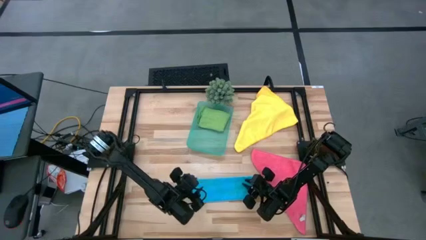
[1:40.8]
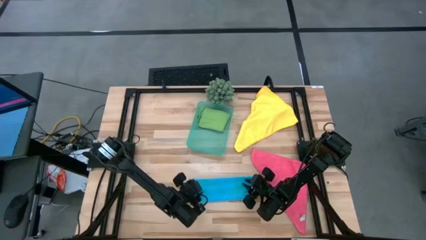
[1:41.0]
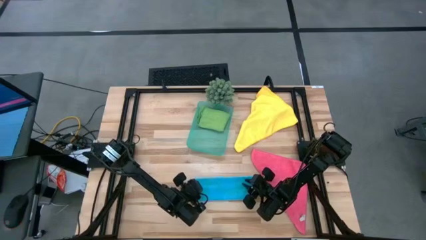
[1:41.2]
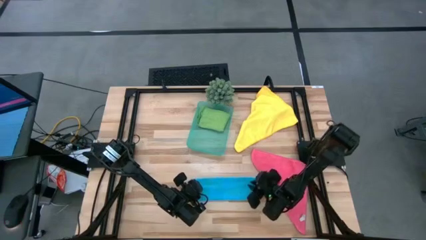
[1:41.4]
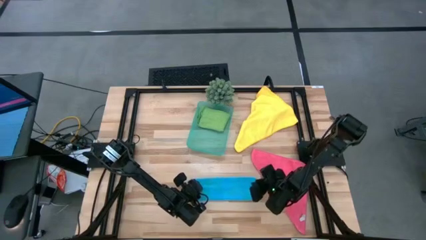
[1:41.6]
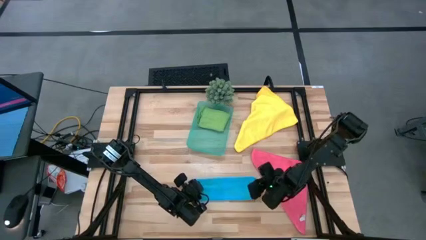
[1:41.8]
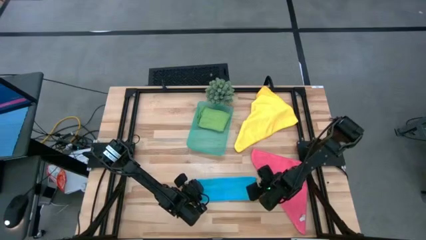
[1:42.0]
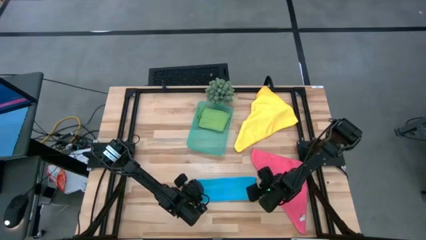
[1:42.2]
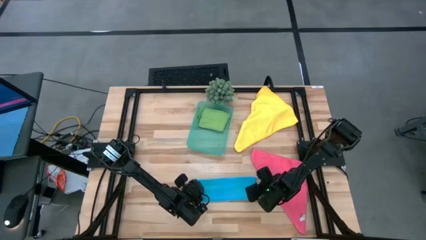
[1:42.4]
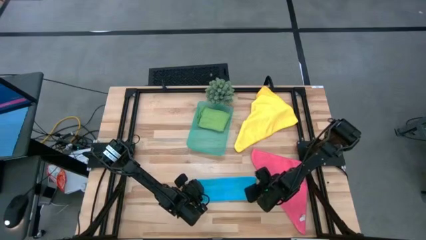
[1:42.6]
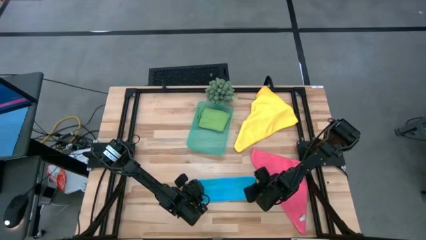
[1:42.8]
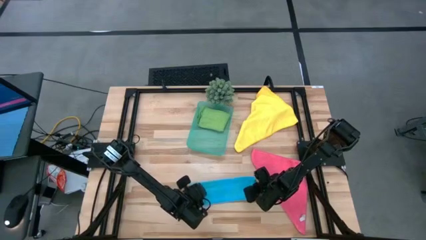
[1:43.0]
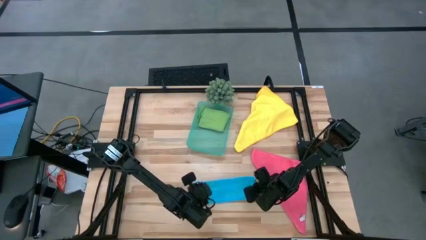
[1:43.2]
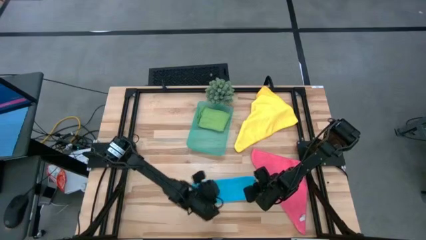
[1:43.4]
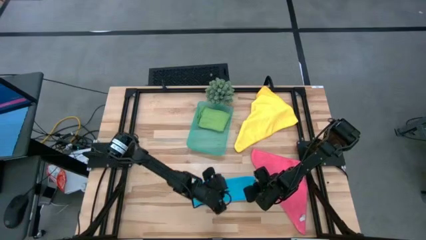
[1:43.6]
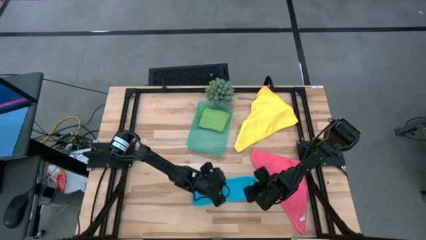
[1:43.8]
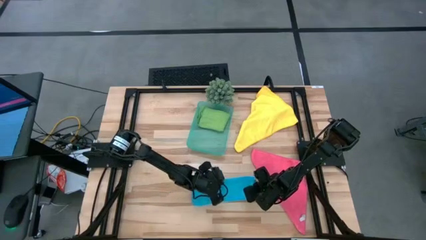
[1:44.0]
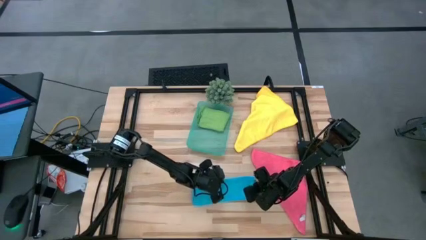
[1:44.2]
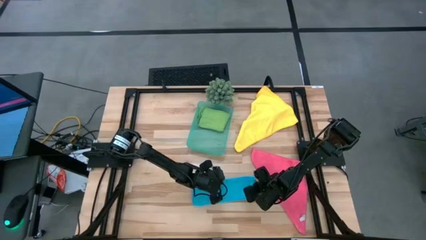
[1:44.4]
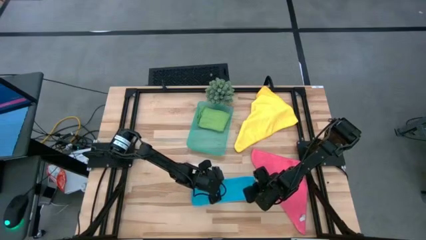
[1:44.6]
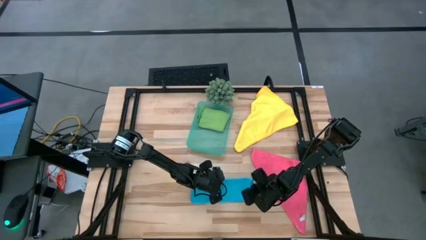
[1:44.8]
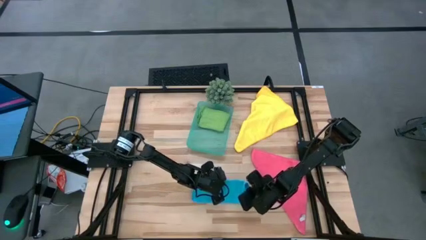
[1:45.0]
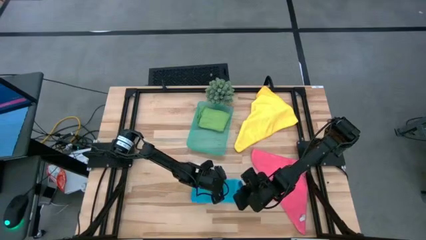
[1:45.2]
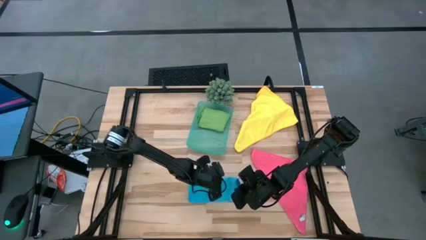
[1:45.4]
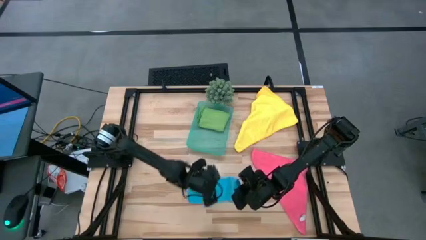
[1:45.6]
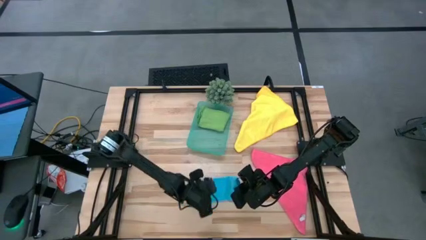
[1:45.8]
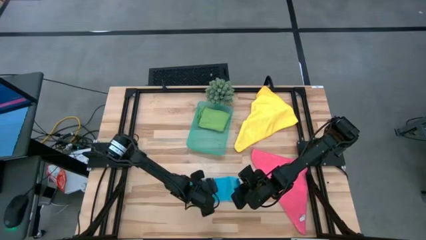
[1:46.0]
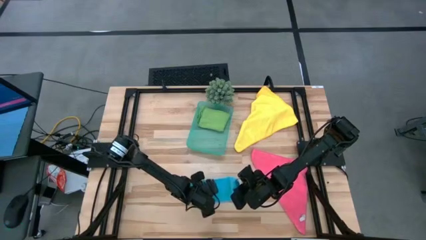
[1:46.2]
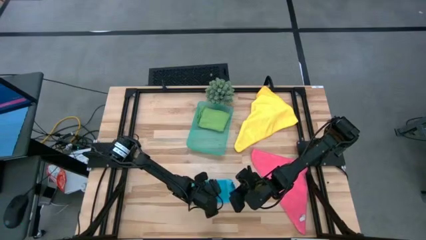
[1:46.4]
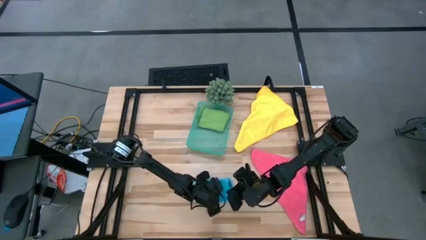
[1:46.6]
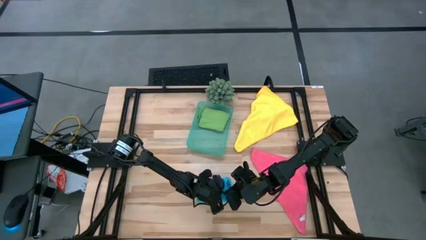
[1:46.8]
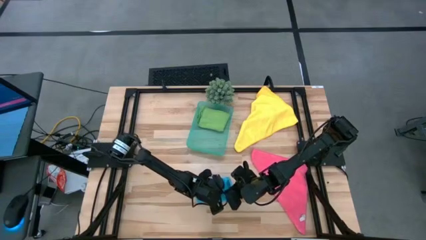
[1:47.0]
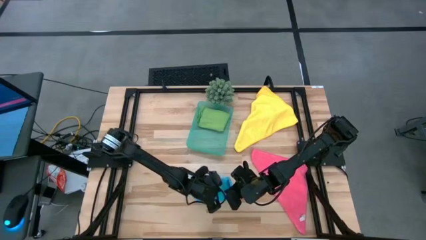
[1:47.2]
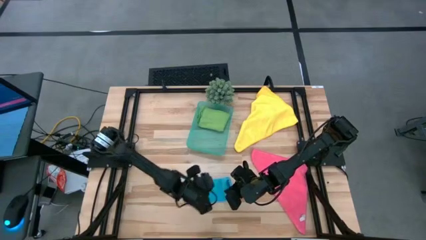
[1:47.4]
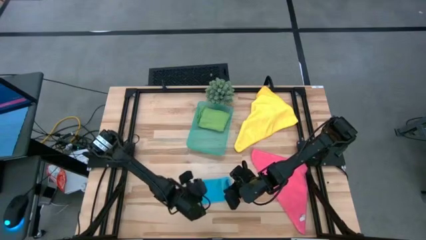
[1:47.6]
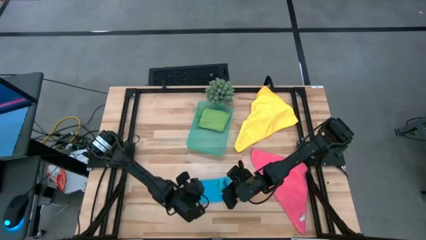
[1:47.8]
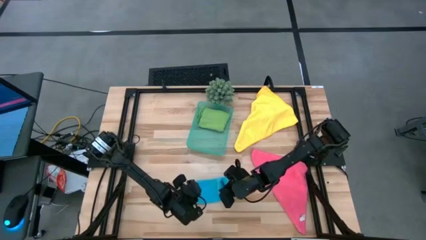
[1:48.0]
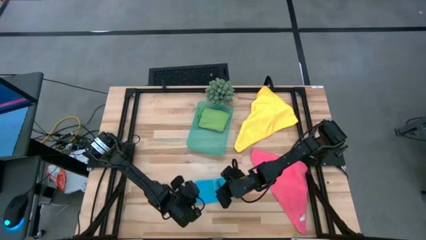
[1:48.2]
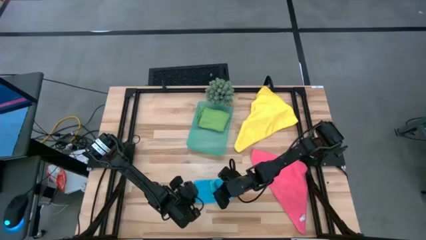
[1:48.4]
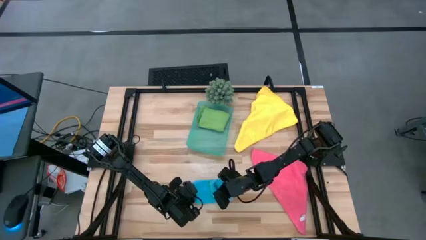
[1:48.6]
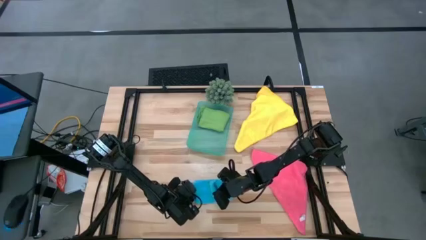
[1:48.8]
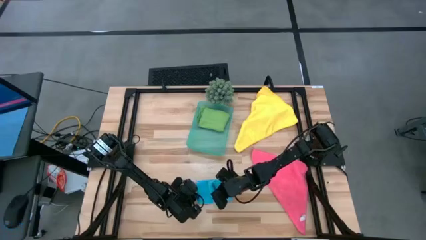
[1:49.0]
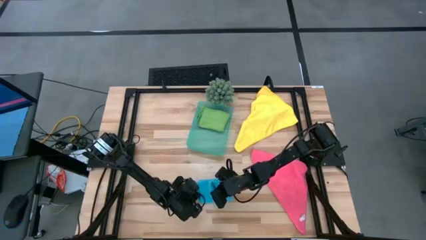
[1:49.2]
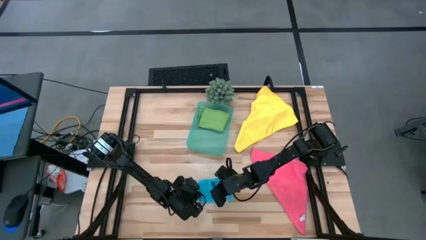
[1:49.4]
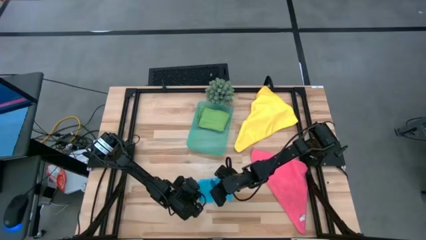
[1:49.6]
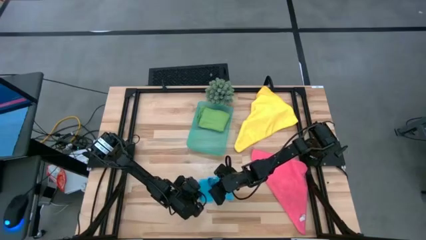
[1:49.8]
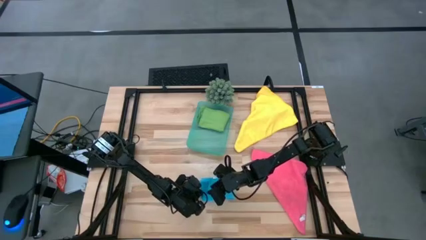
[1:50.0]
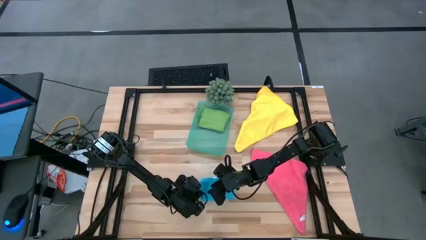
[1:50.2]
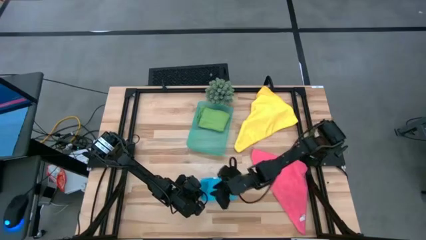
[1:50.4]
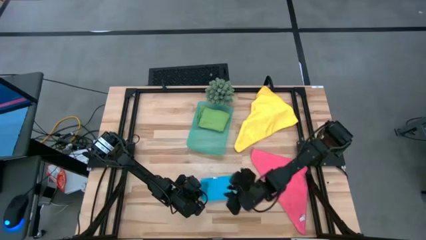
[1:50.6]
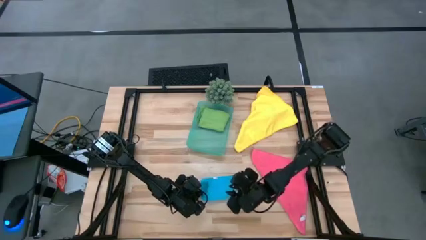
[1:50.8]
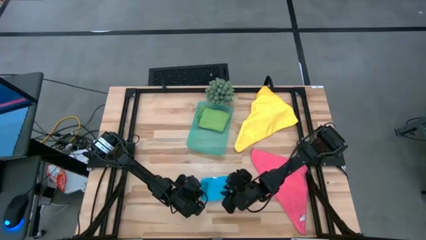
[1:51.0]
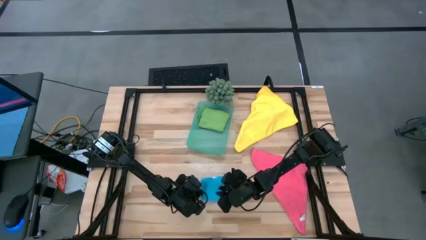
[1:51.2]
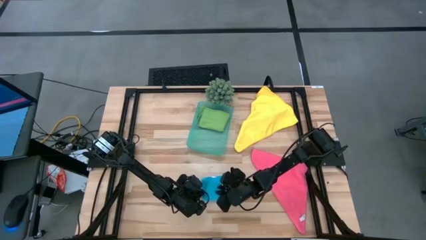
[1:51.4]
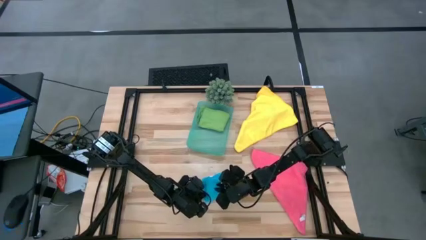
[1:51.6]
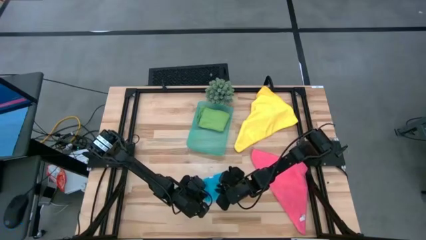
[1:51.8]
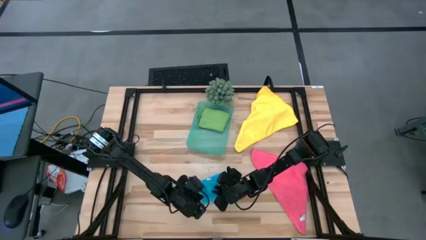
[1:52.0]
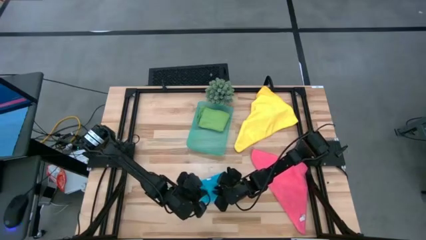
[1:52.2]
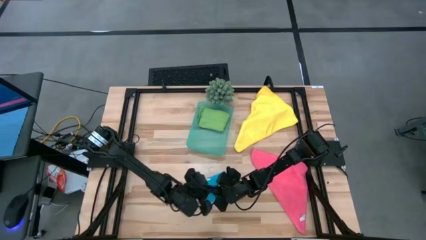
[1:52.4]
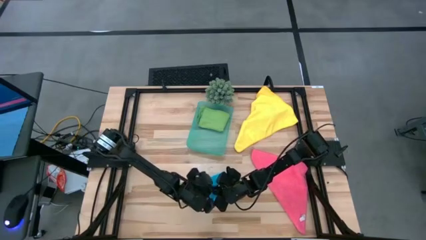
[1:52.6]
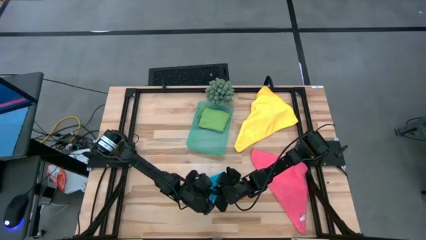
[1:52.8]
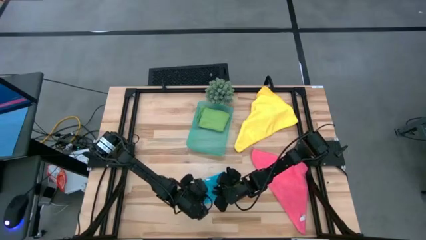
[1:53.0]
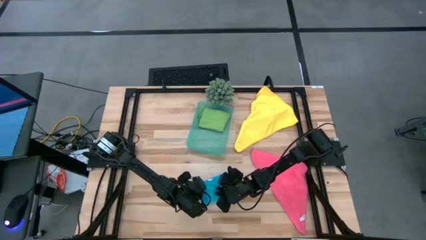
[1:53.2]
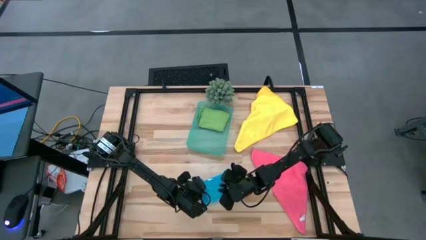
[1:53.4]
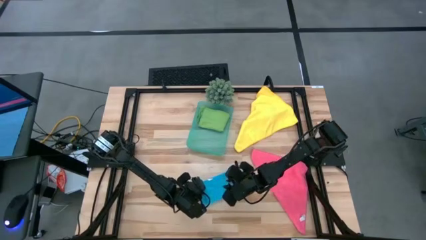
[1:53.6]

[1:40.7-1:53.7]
Task: Fold microfiber towels
Fold the blue micro fiber cloth

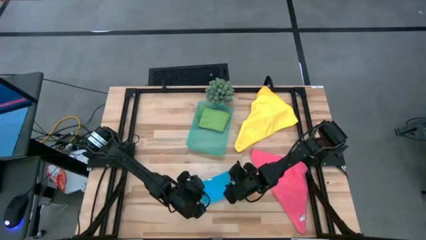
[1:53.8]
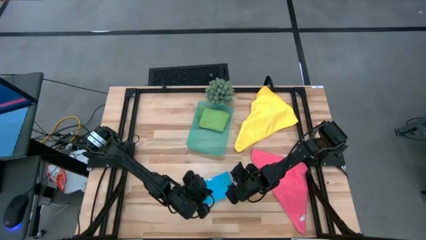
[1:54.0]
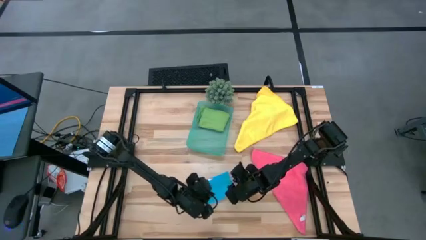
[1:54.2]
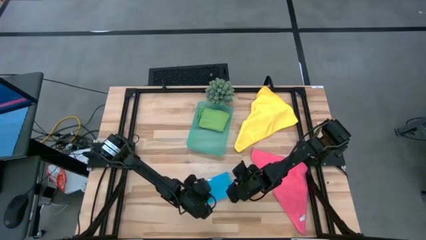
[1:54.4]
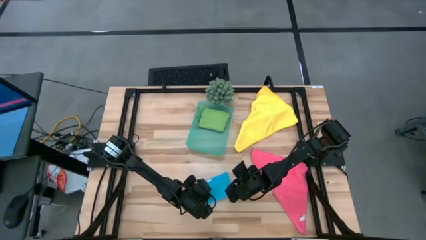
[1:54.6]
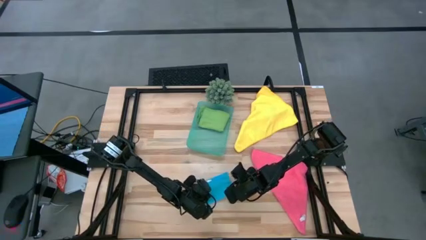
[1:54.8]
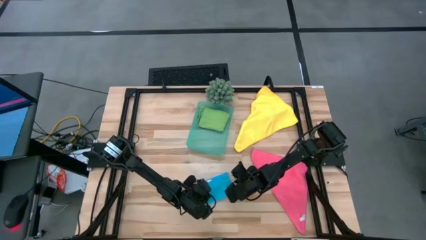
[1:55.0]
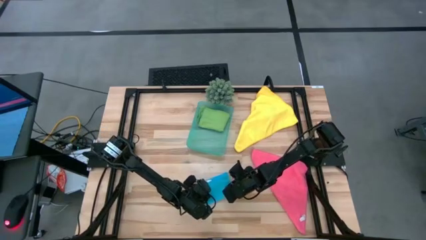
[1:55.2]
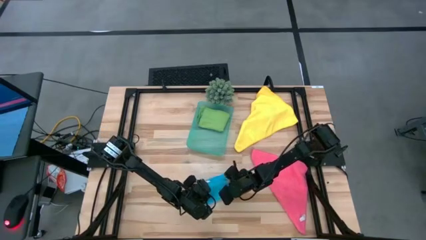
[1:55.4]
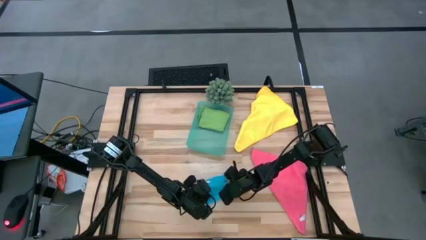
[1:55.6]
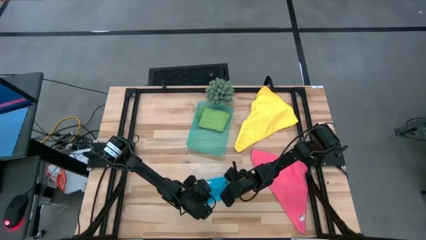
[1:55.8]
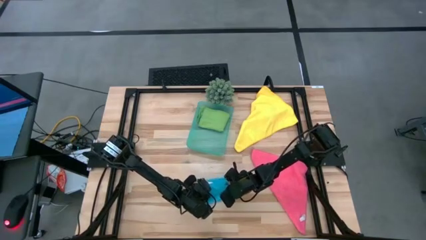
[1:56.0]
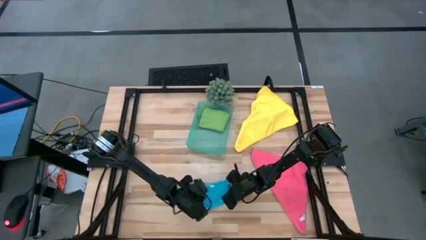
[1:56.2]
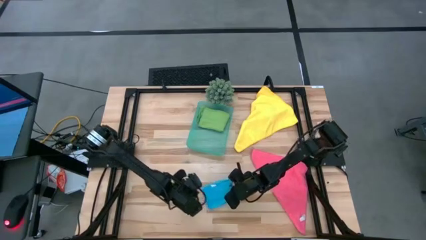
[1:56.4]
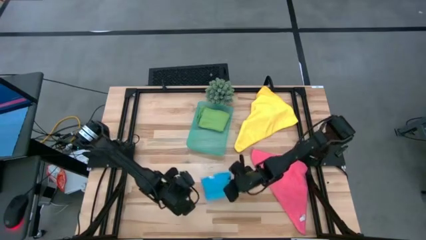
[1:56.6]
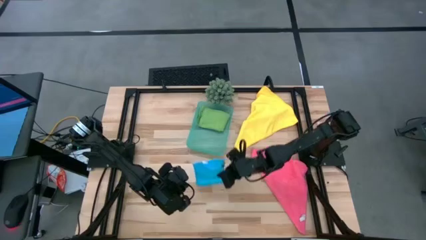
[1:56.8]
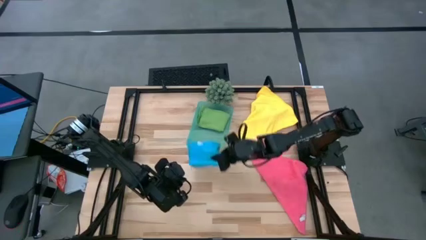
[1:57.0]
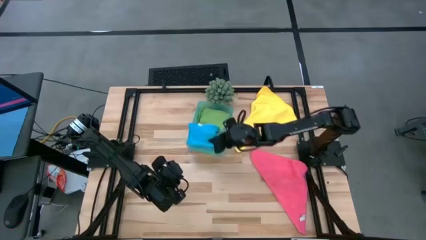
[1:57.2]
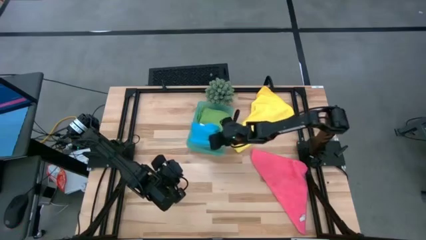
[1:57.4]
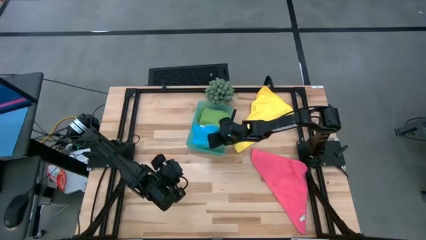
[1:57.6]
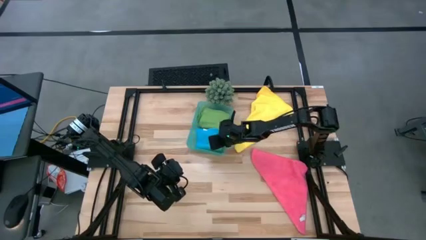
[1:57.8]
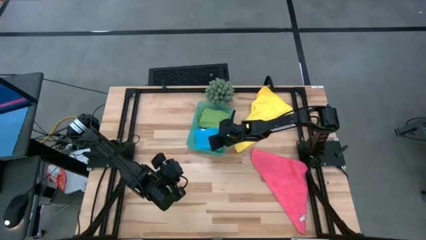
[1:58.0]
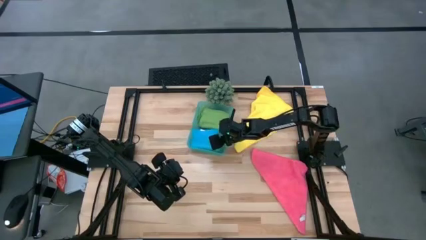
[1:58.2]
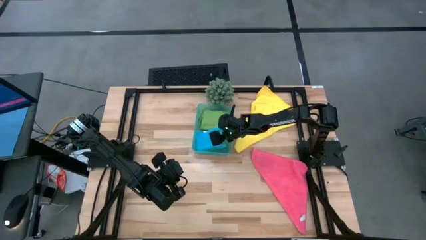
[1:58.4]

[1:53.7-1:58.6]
Put the blue micro fiber cloth into the green bin

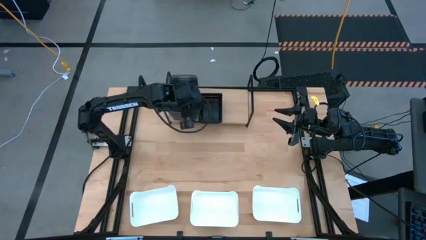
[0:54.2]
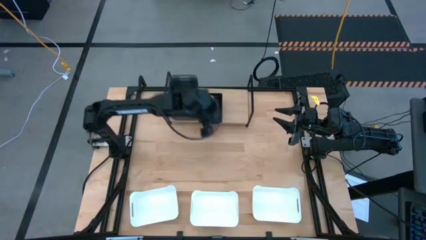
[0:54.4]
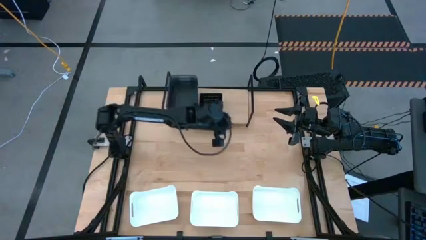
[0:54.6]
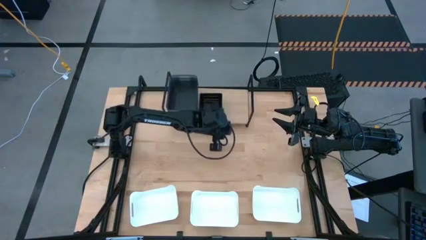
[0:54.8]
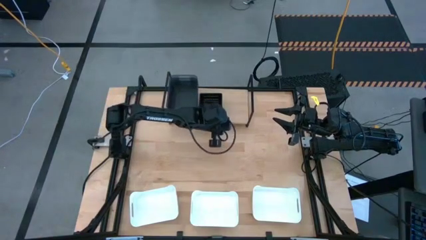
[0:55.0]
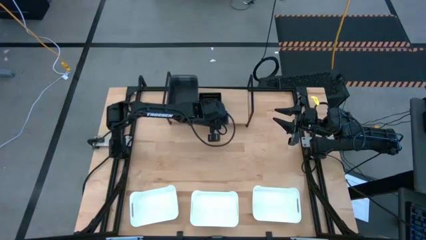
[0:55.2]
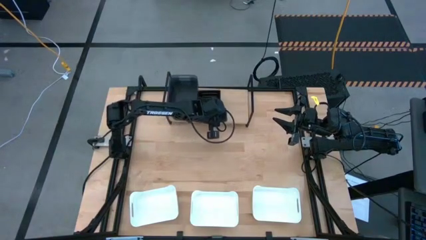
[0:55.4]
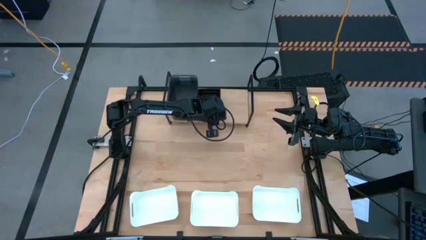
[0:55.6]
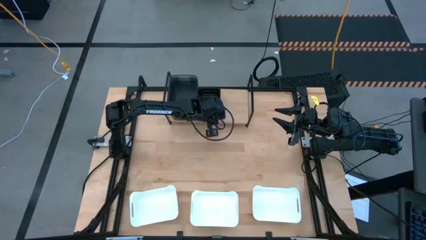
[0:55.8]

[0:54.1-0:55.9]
Task: Stack baskets on shelf by color
Adjust the stacked black bins on the shelf
